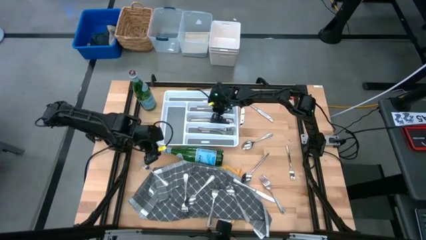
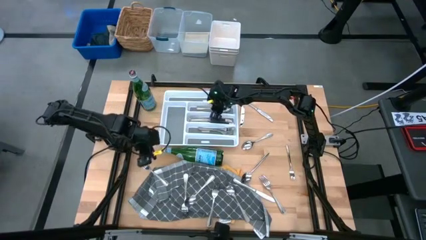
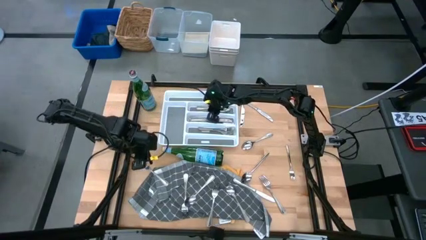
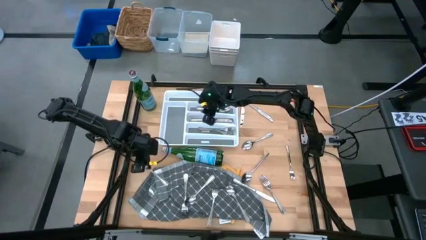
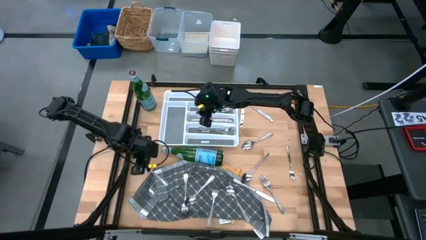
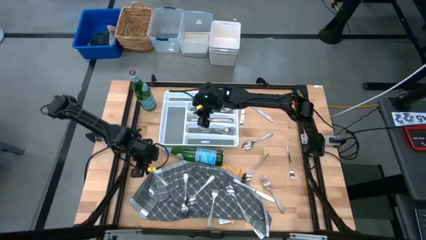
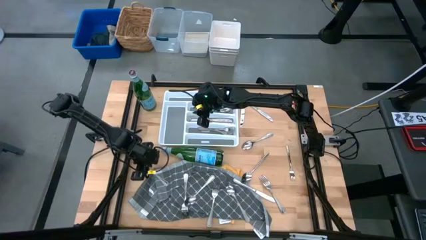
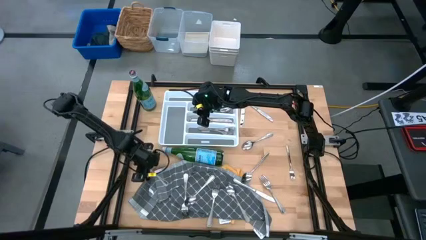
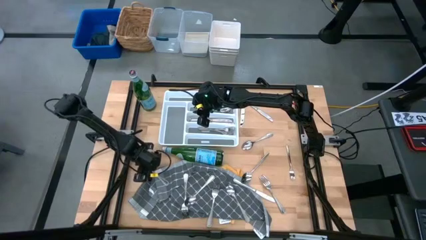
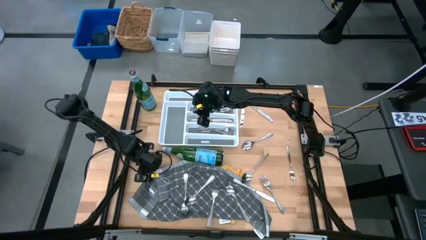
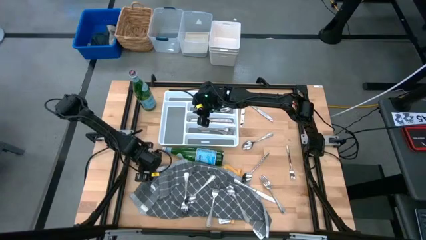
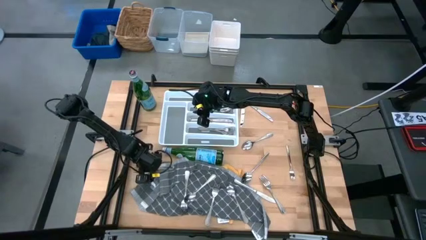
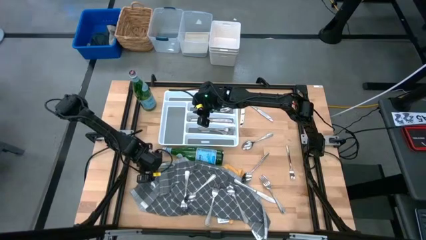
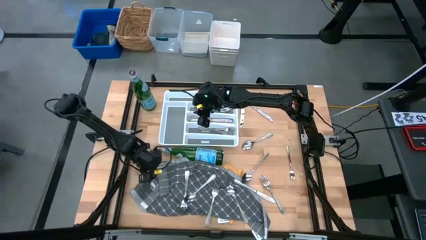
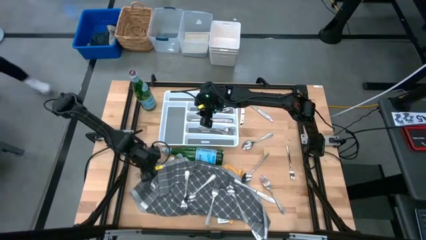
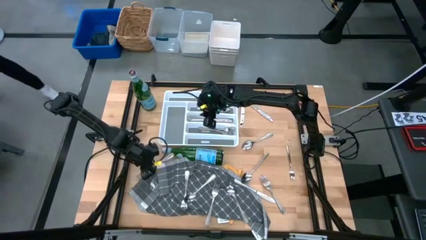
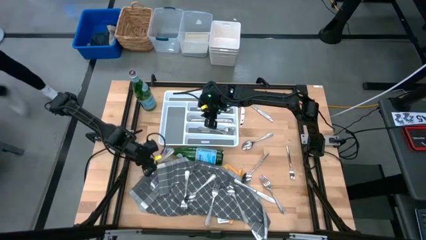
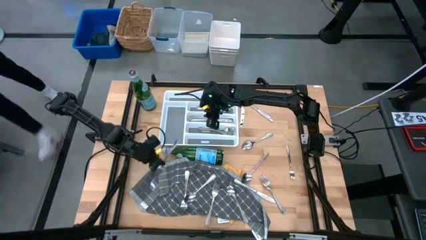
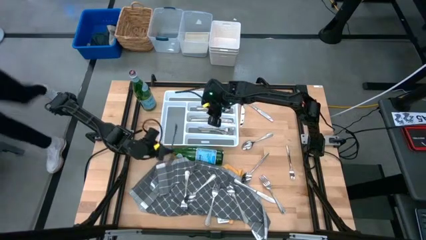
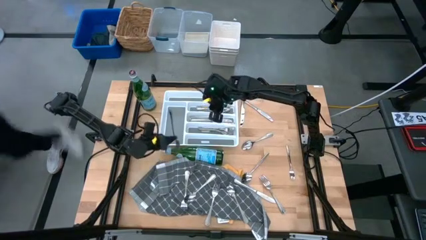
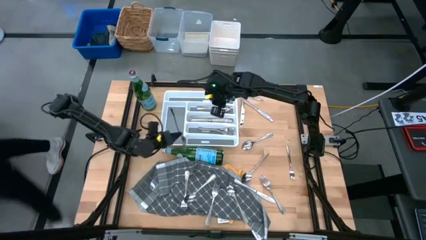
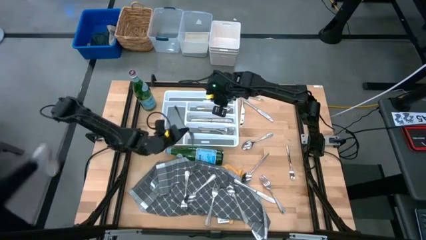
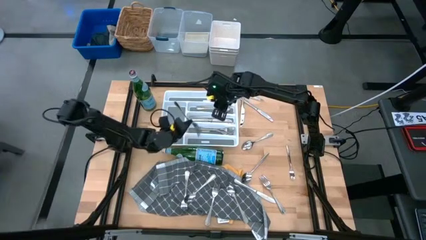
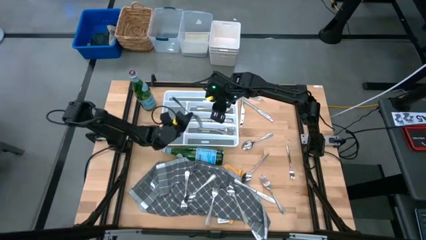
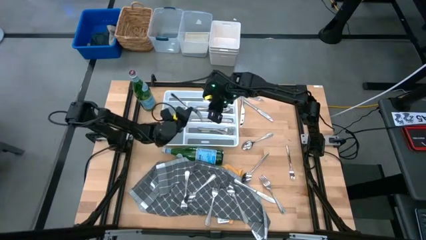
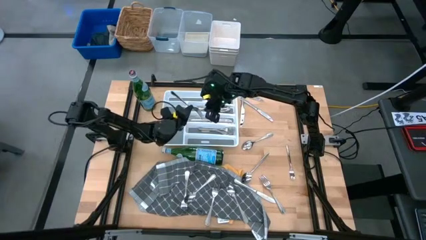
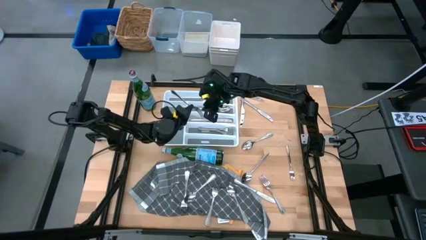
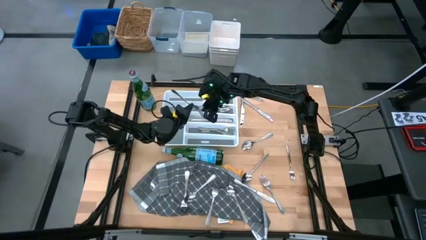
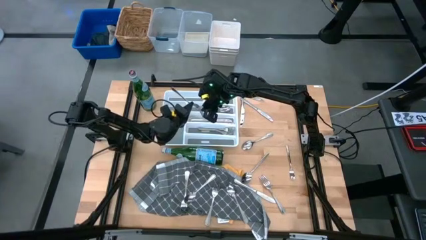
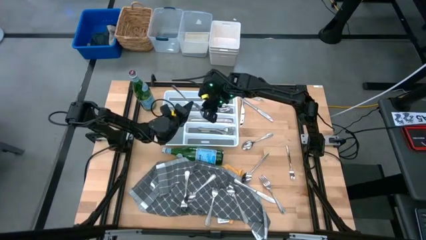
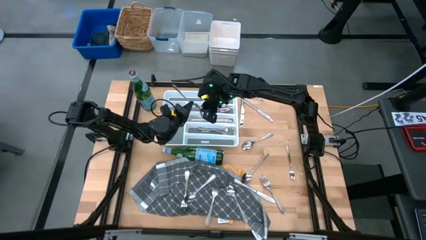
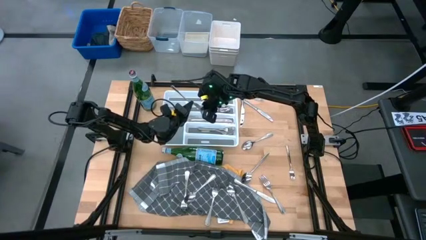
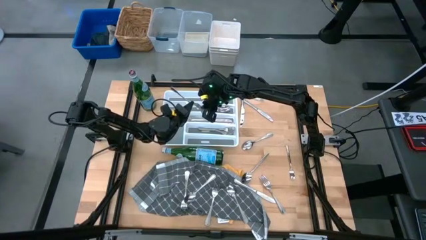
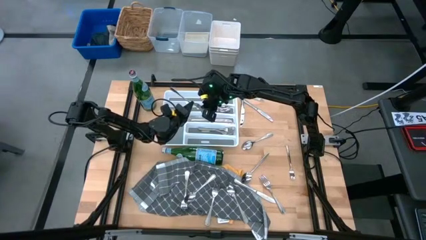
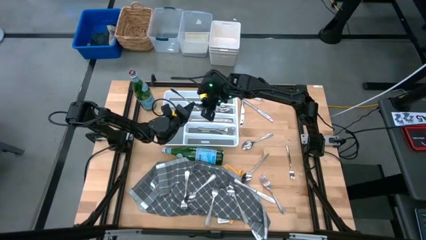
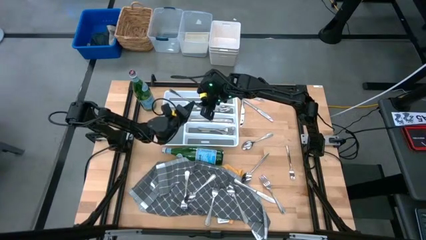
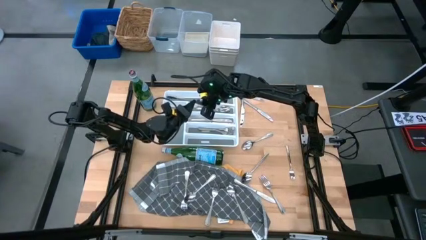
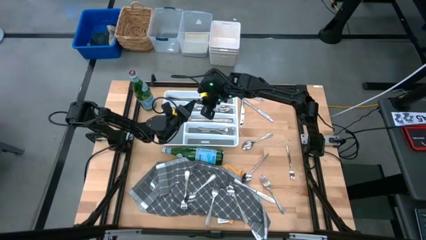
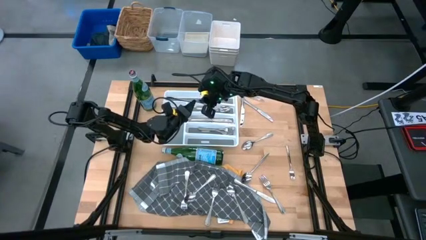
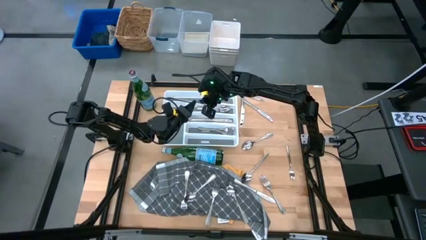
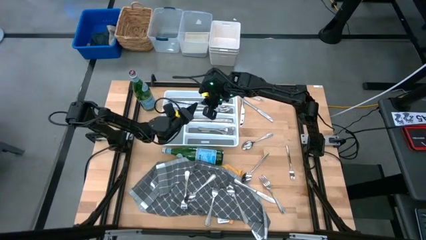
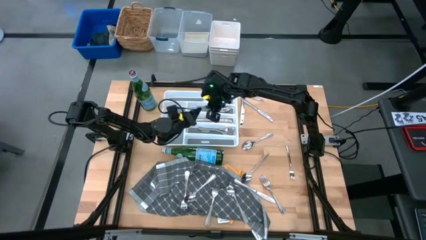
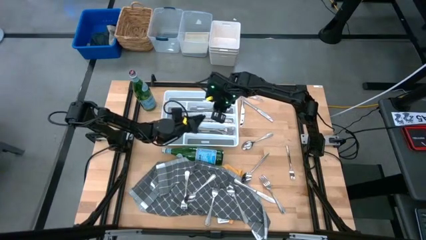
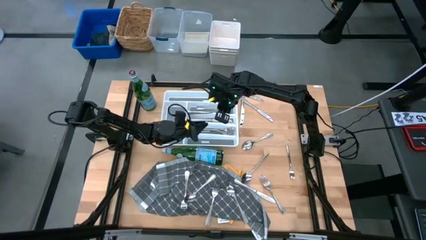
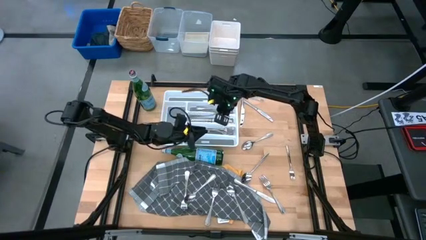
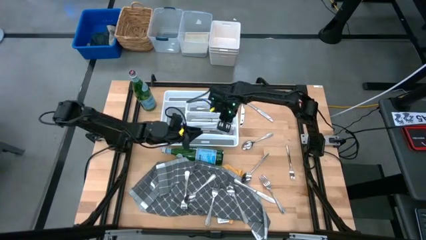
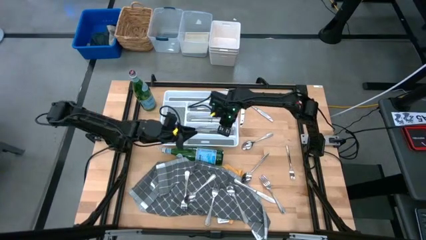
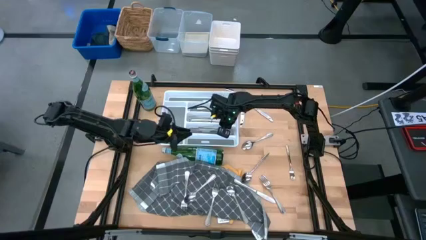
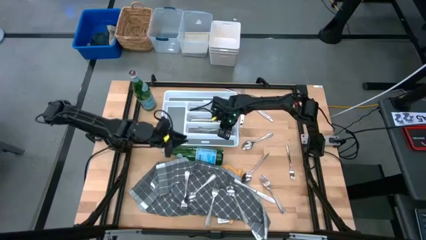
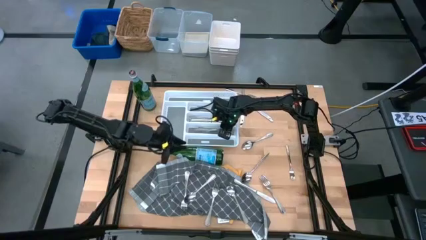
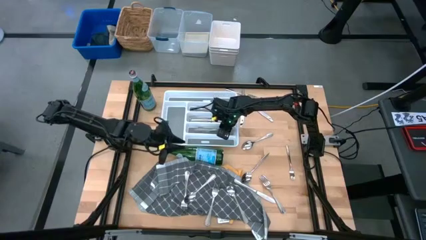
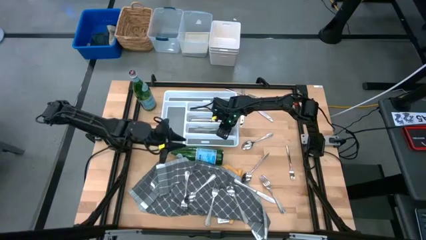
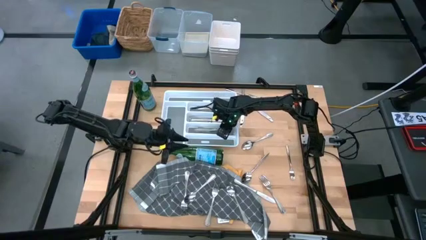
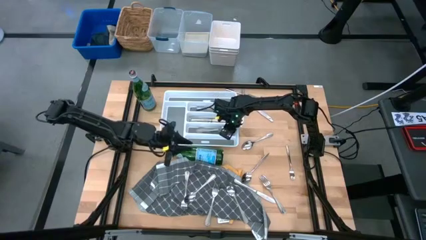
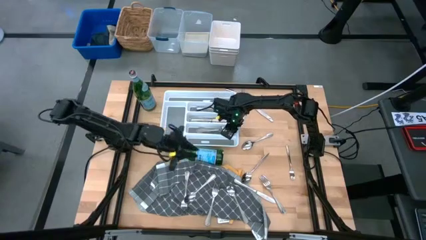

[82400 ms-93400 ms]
Task: Sort silverware
Put the silver fork into the silverware tray

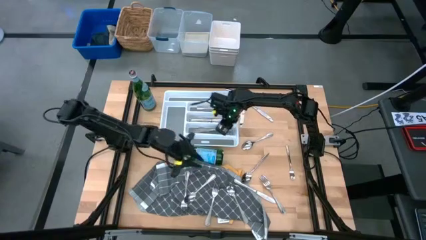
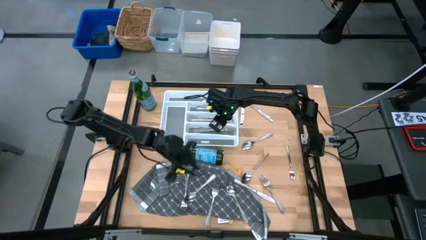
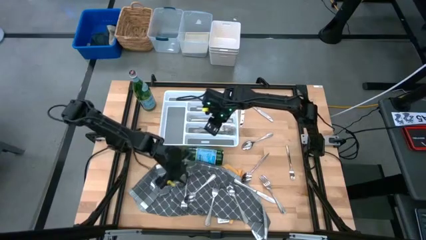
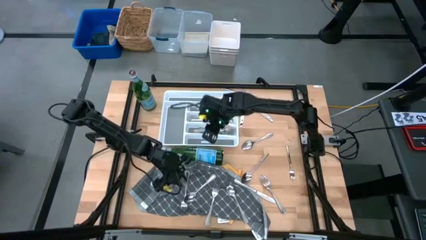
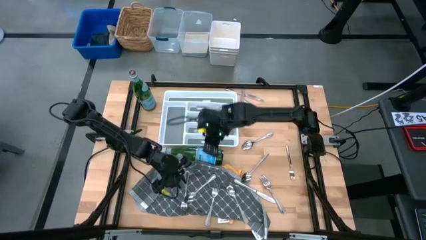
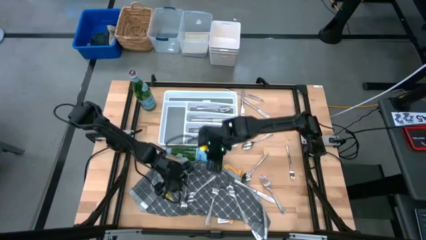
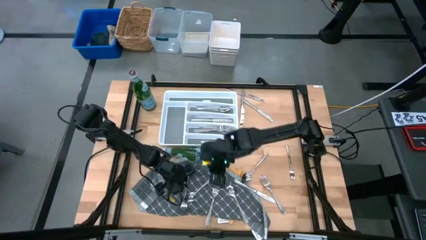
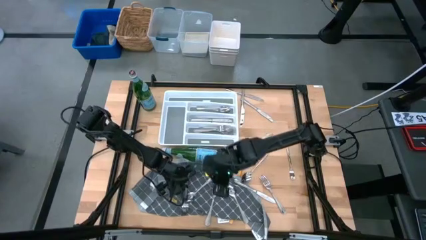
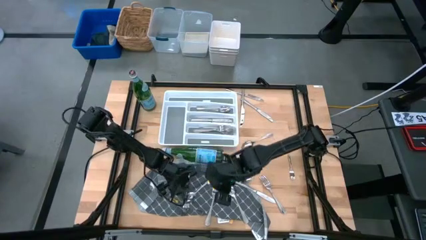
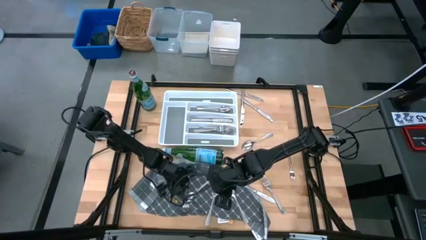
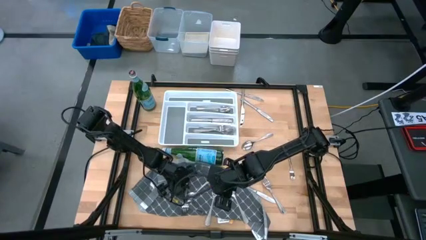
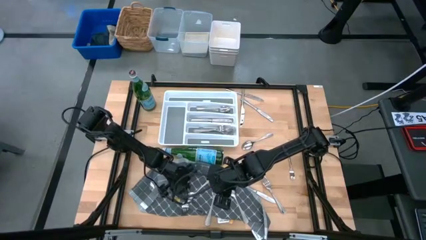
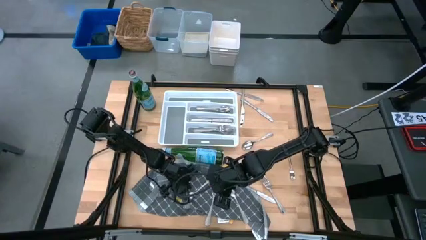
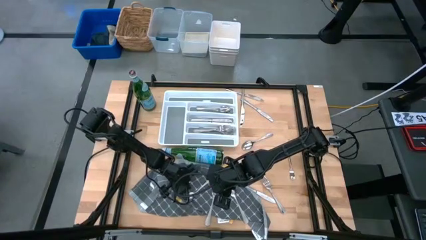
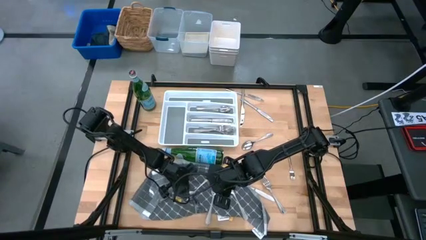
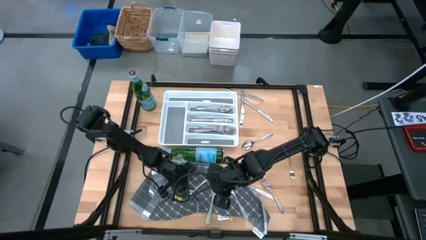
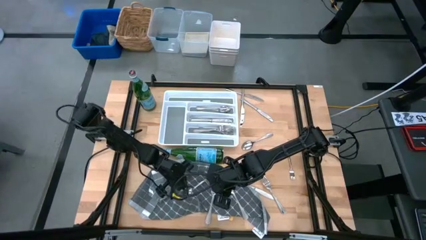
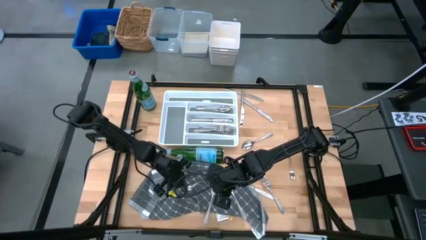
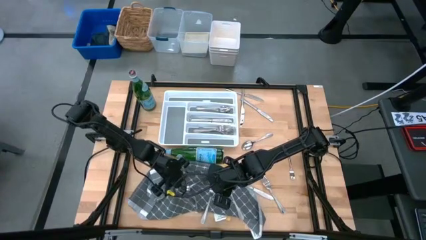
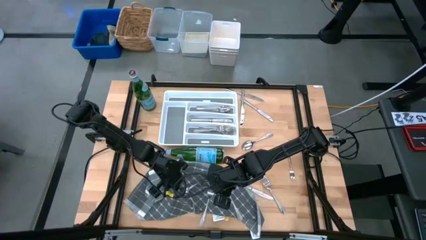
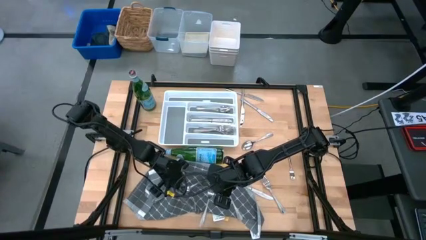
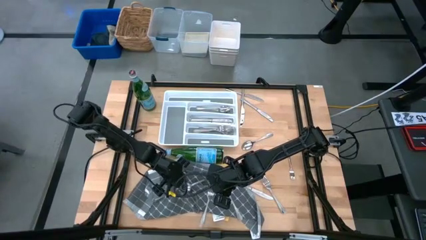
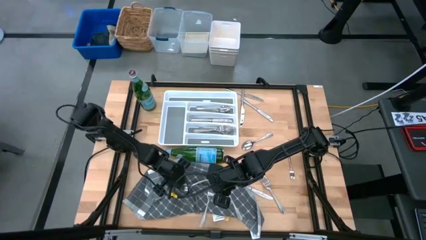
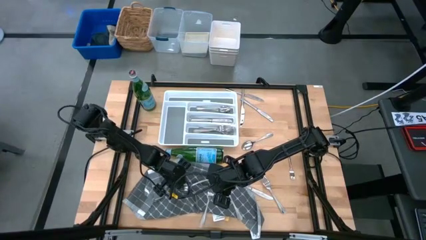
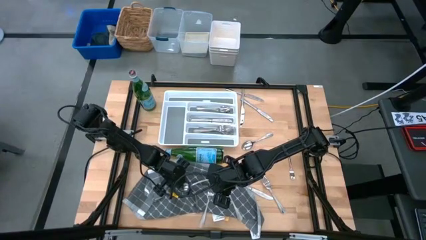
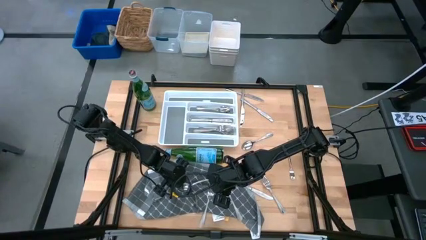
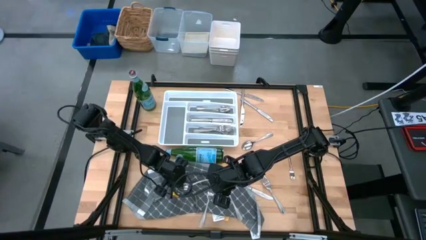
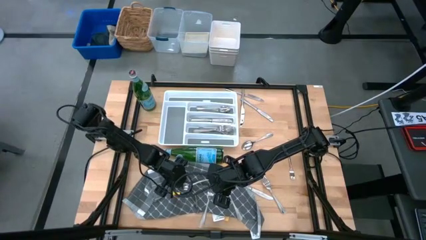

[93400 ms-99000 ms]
Put the silver fork into the silverware tray
